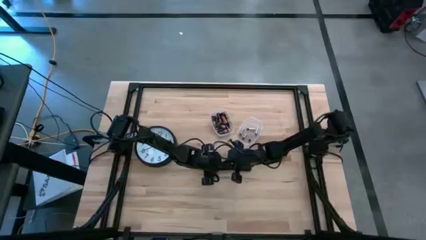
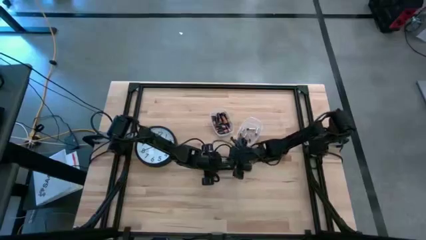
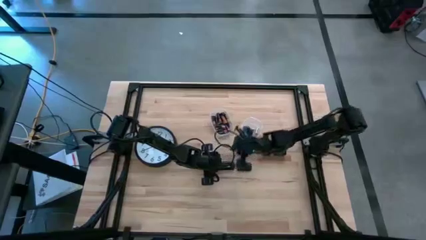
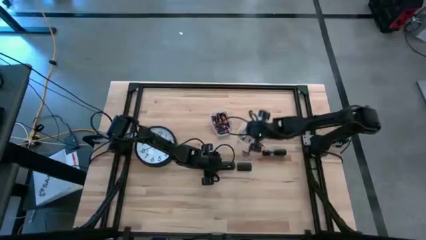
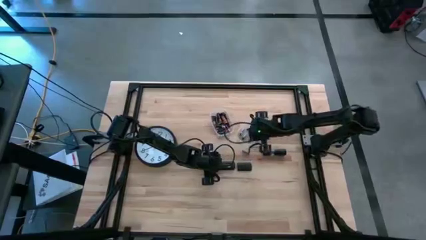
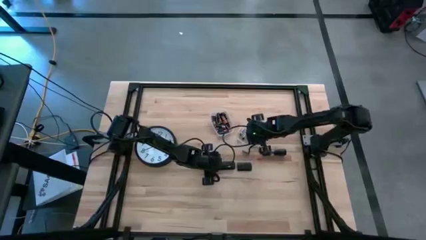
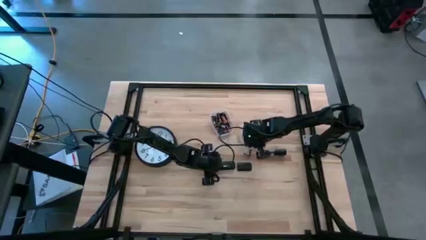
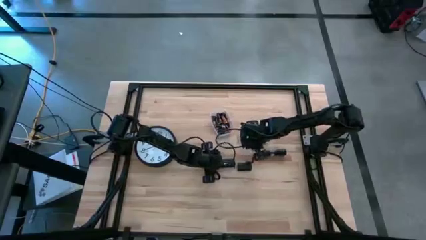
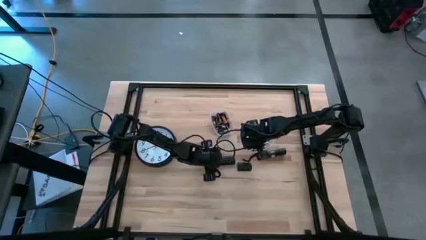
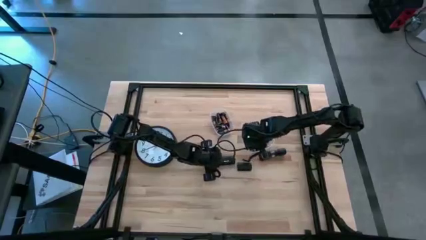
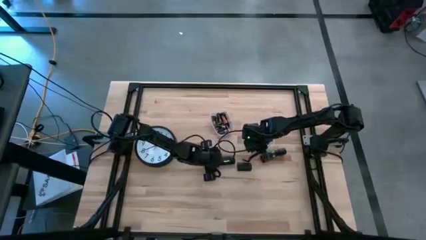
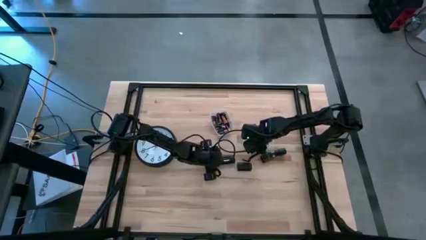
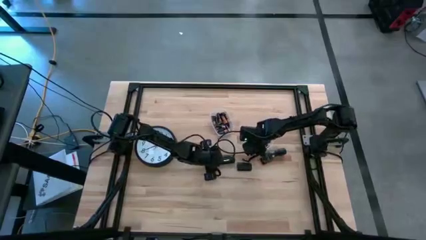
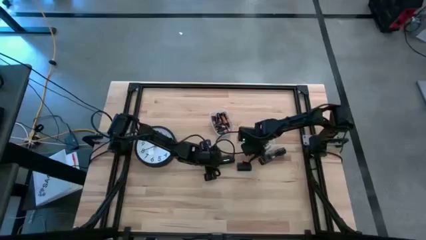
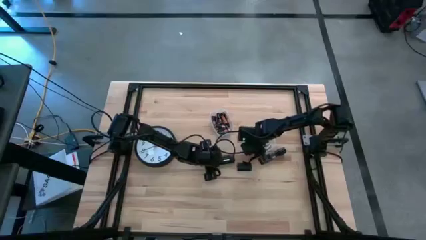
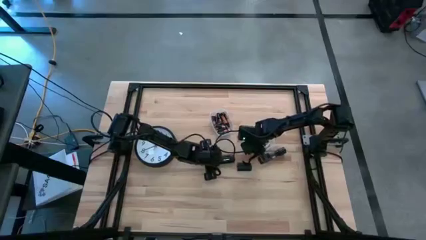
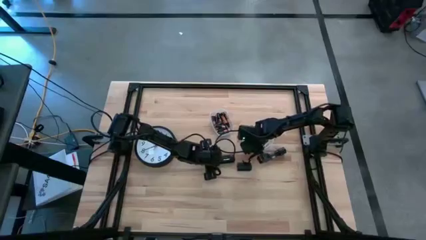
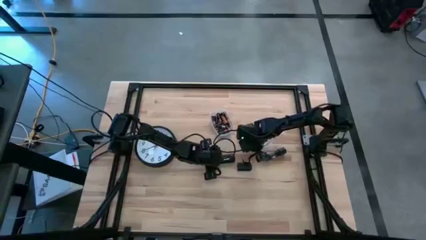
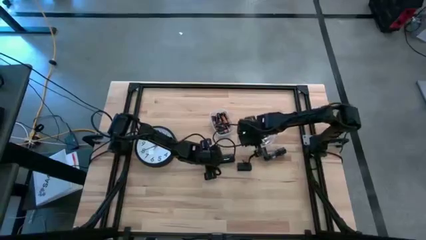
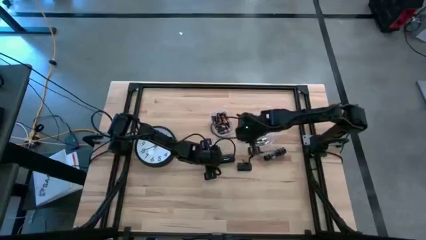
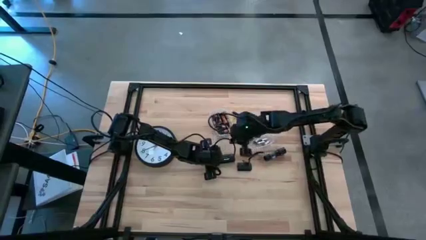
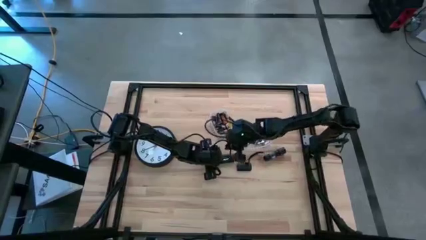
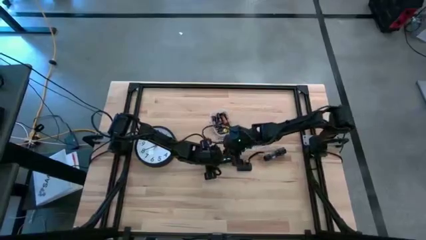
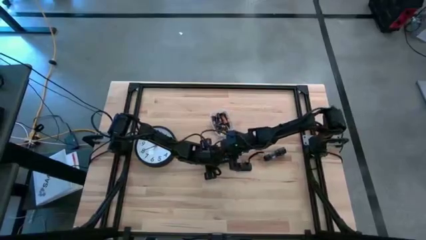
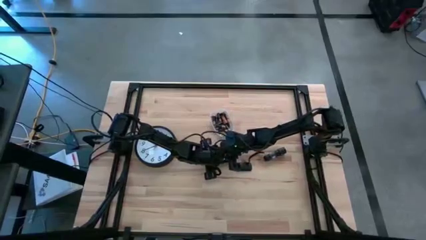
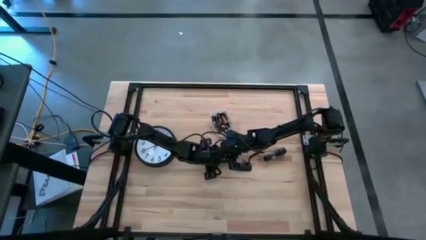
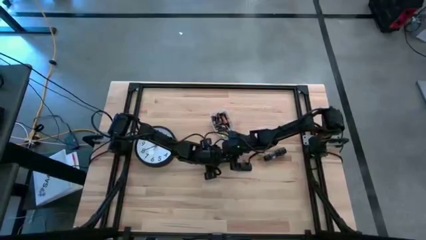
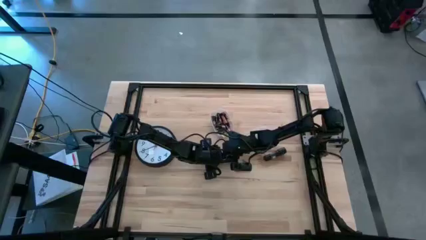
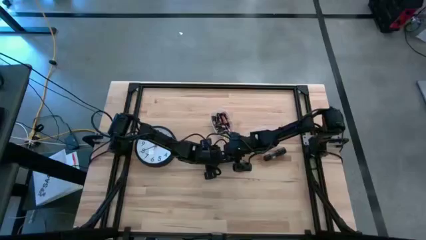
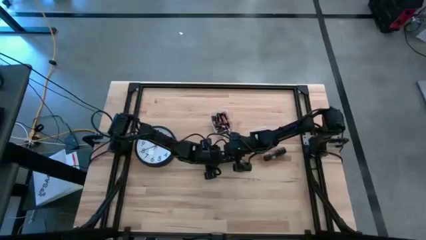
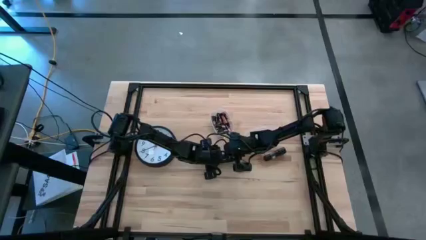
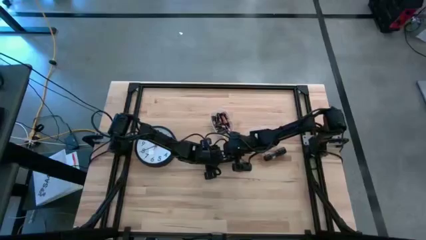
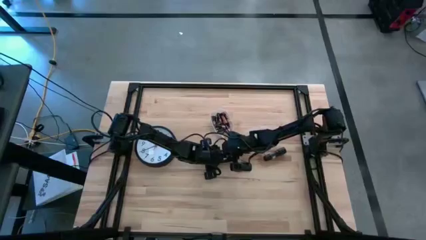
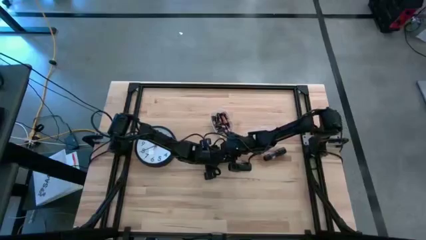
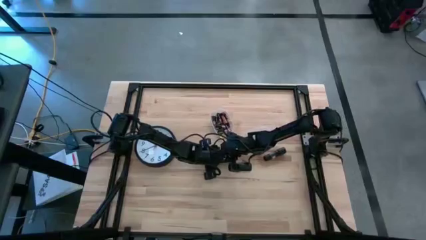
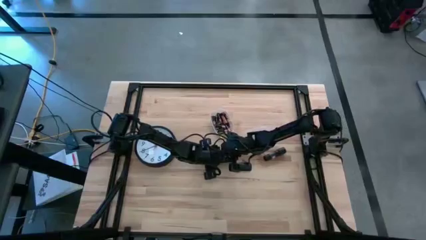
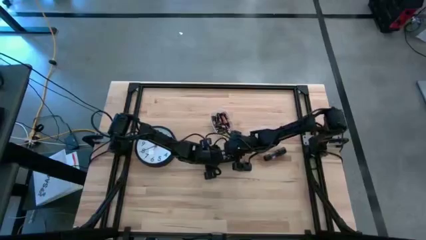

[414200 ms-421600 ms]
Task: Insert battery
Insert the silver battery into the black remote

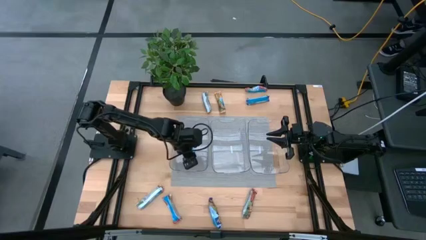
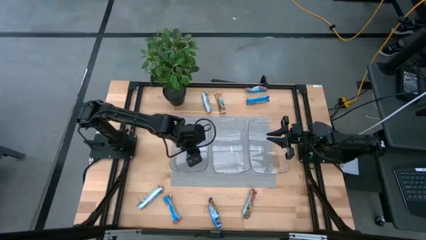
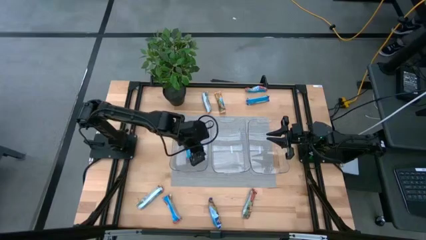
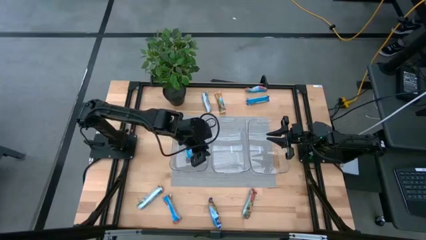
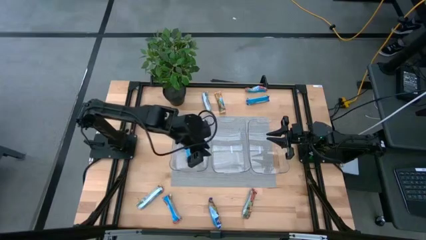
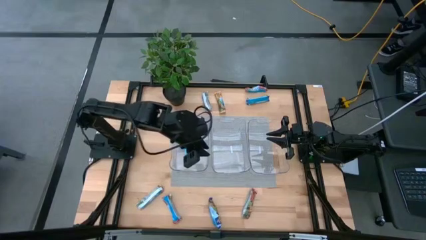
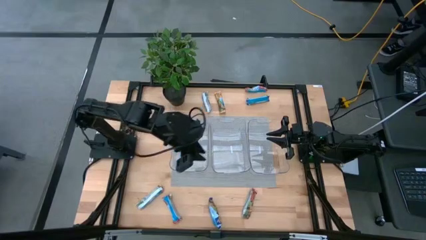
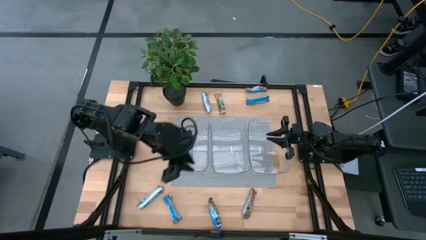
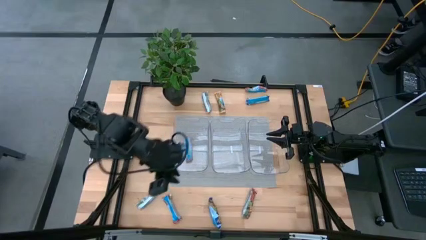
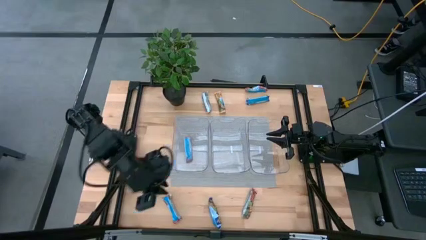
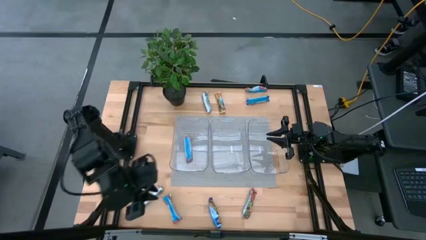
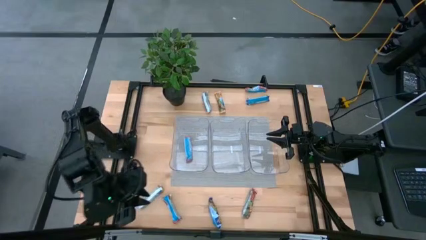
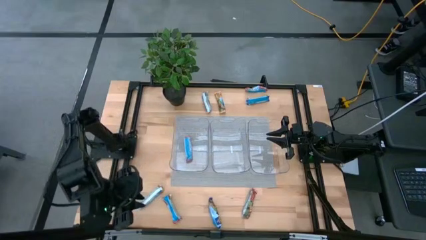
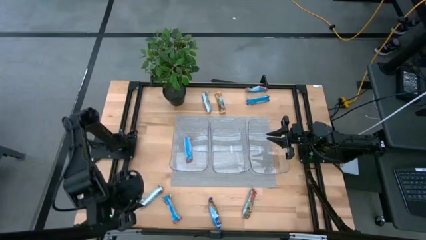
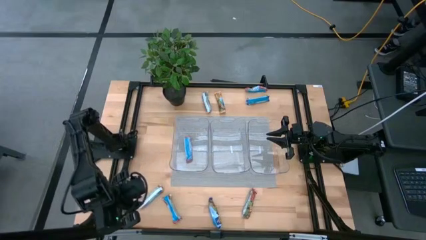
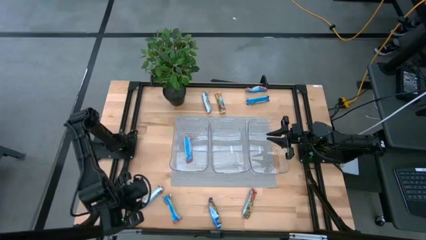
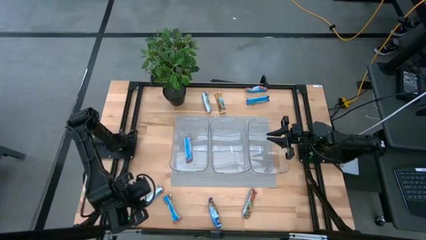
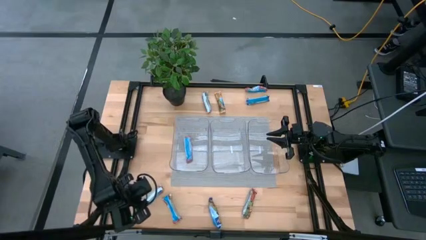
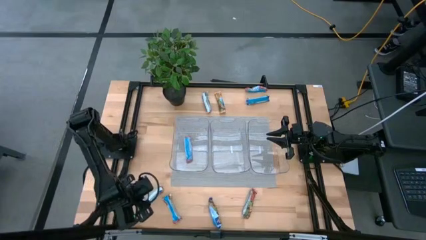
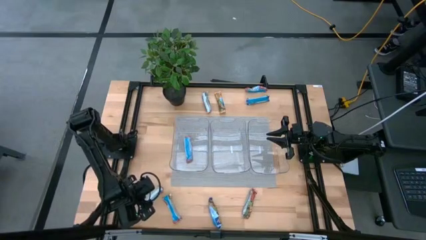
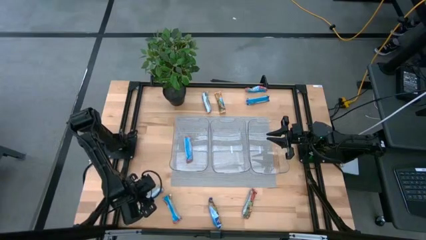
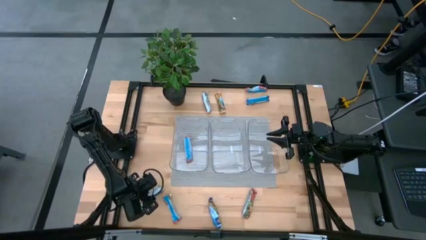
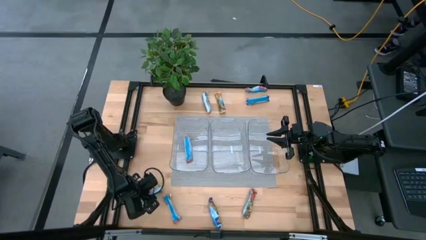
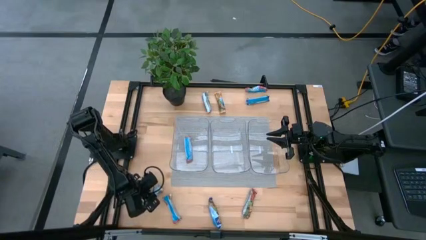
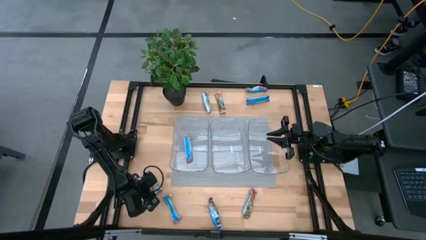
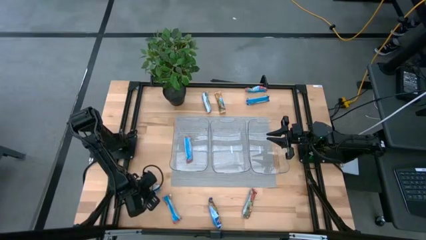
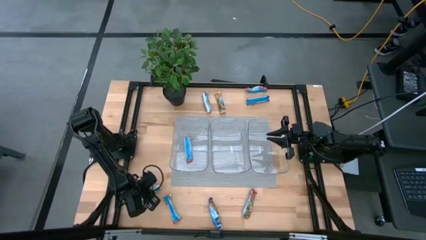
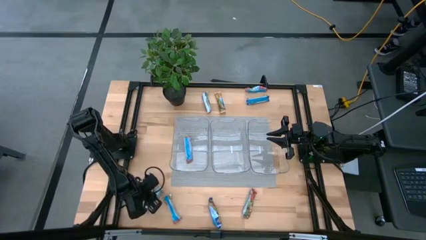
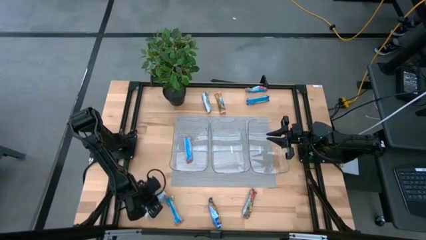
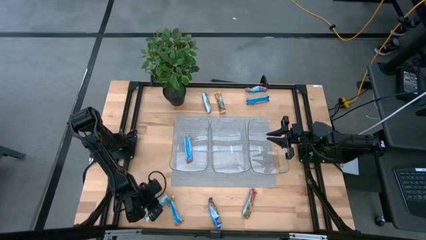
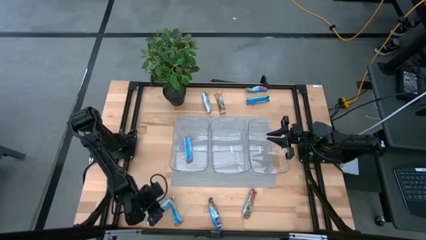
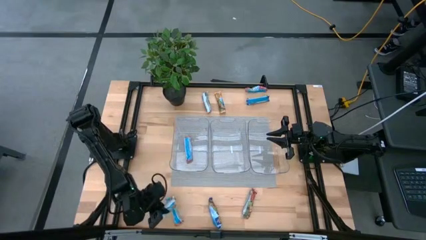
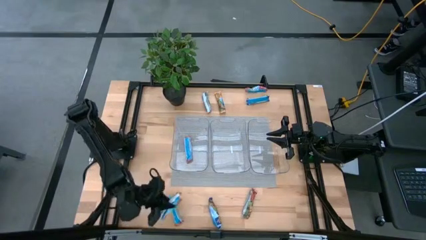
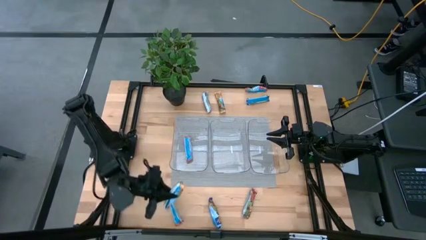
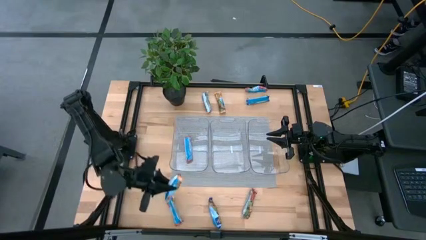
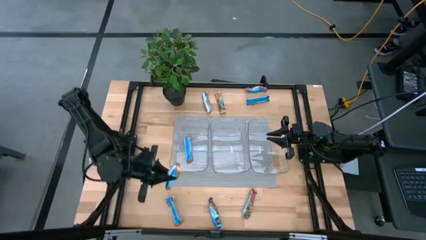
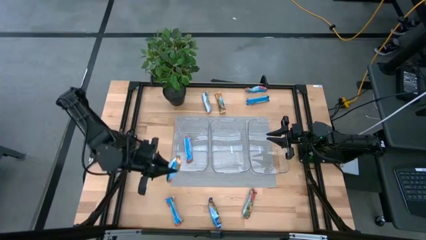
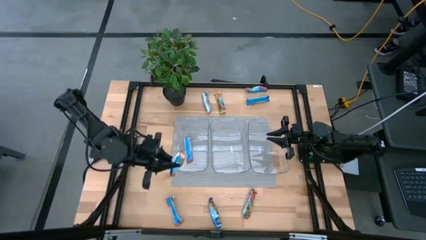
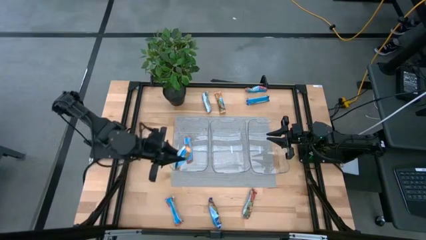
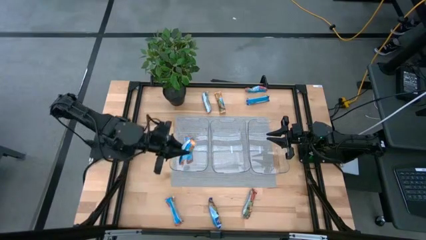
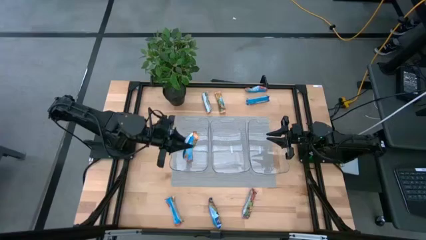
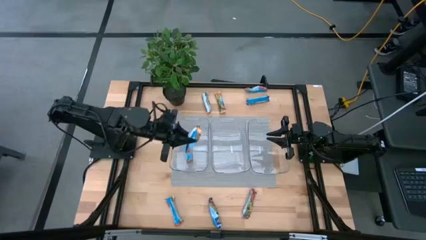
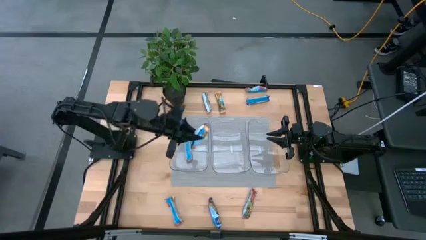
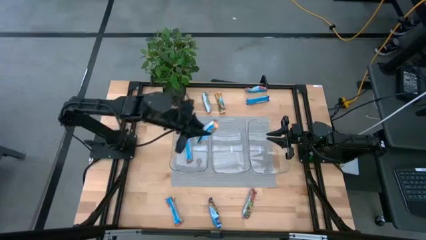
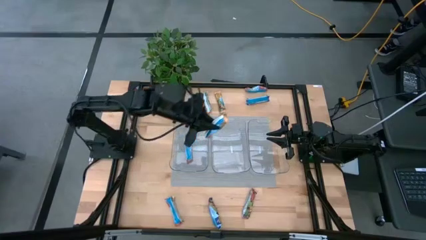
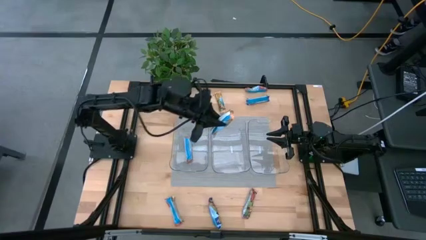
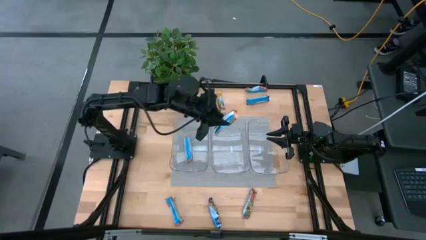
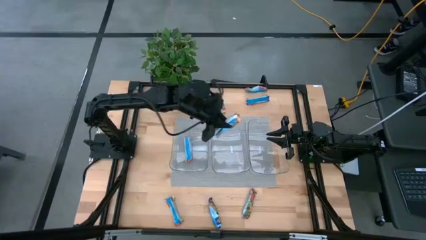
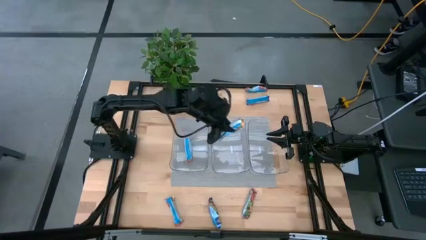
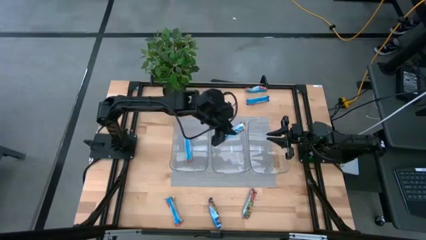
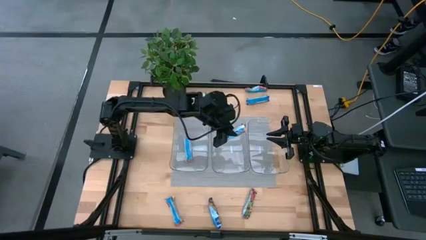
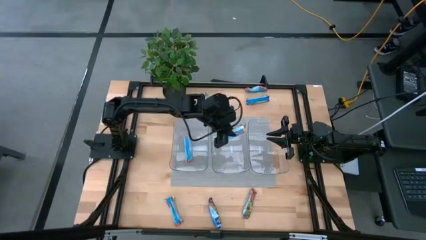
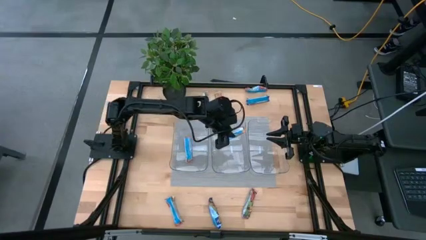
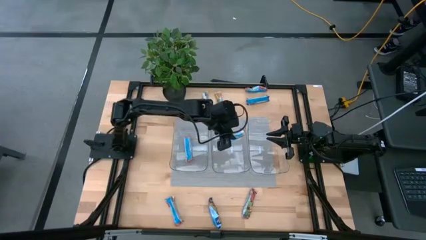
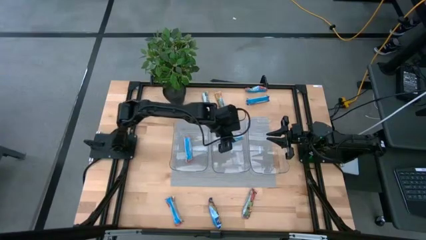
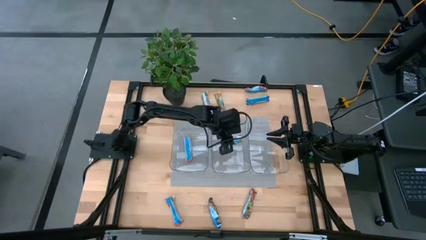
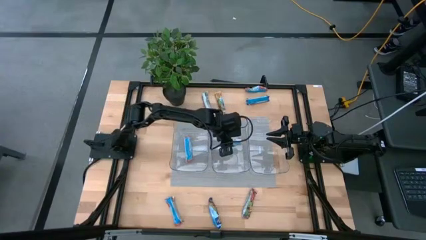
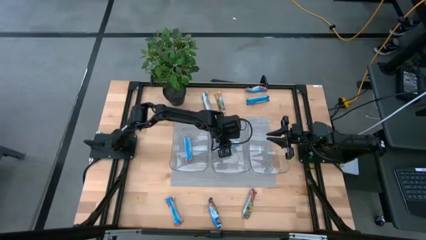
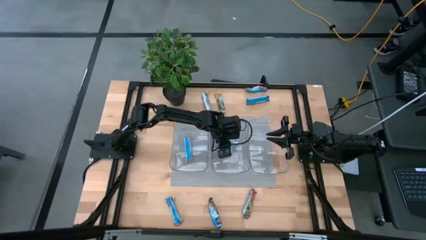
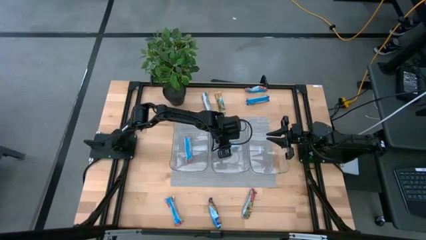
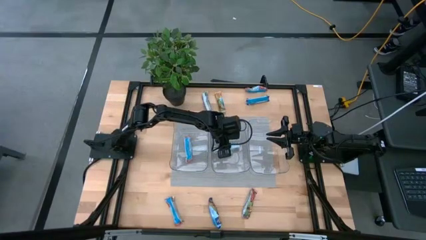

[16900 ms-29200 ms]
Task: Pick and place Granola Bars by type
Put the yellow granola bar into the middle transparent bin
